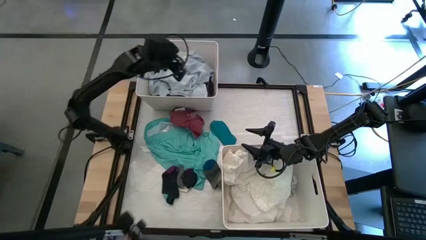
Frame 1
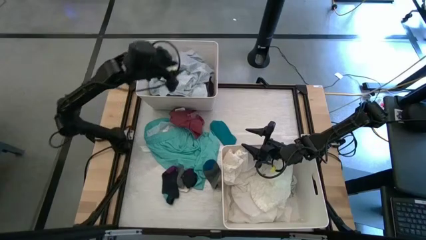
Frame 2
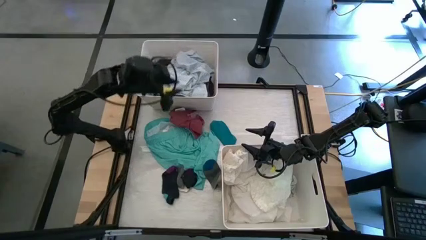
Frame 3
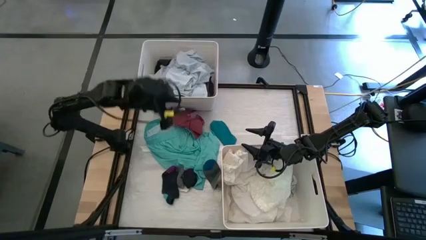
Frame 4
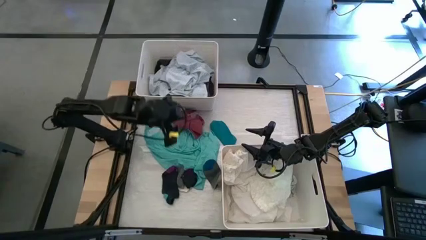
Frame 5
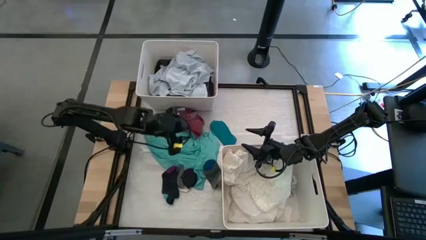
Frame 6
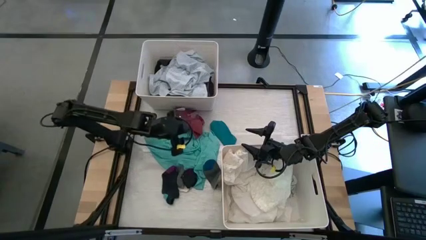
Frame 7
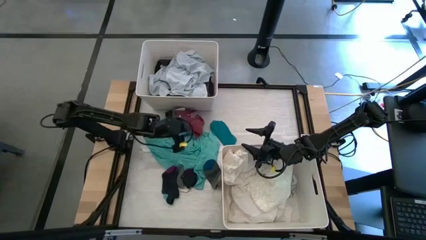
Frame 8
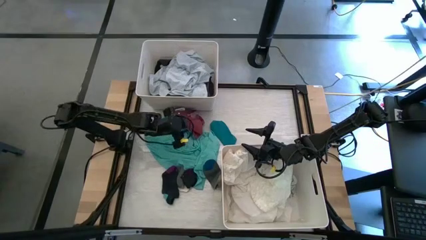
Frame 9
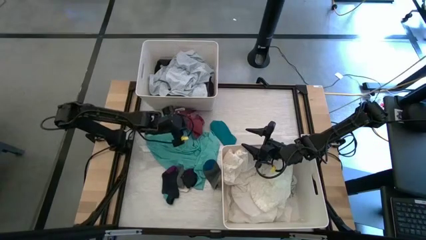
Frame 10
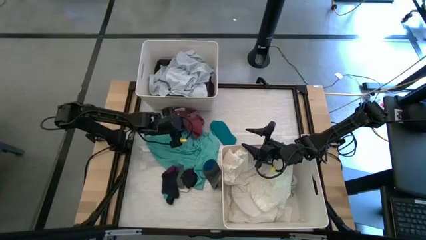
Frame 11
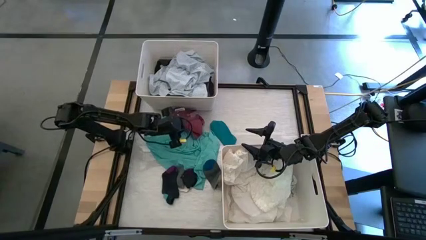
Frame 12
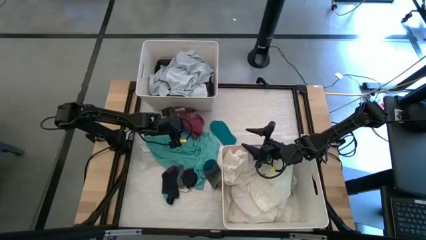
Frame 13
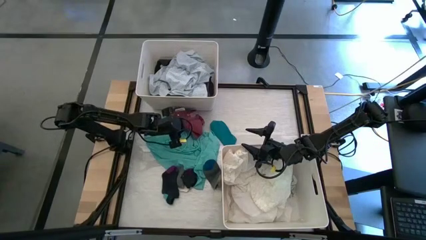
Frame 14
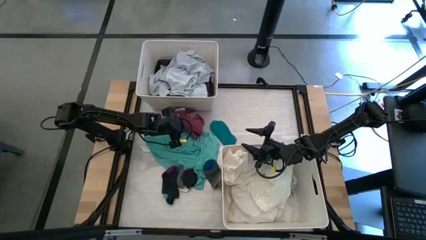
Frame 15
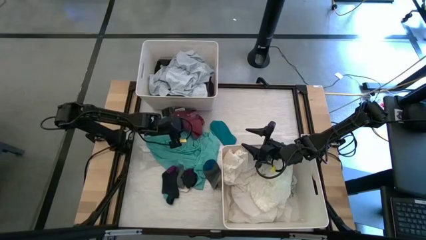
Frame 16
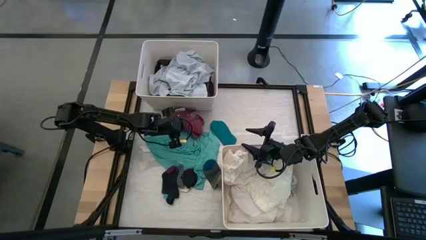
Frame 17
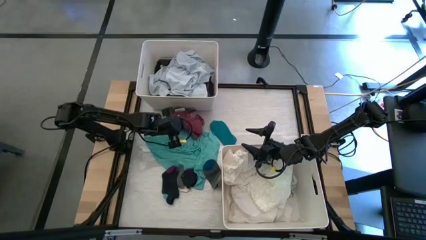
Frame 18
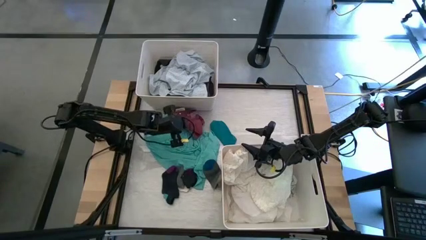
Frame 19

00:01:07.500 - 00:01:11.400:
Task: Sort clothes
Put the red underwear into the top laundry organizer

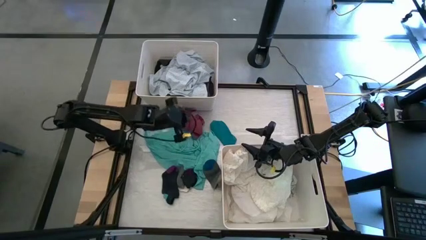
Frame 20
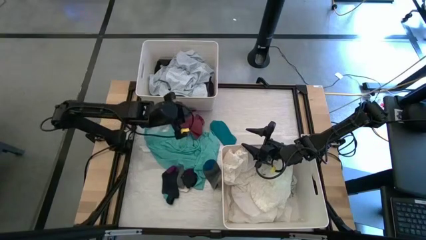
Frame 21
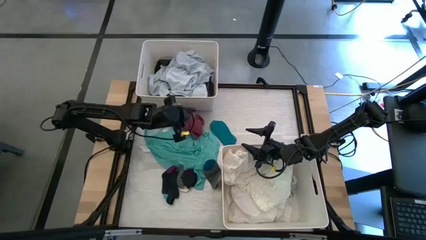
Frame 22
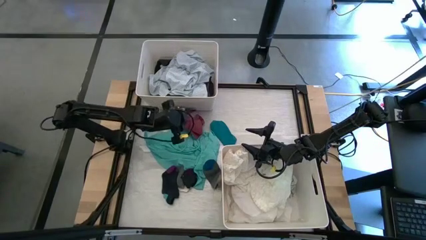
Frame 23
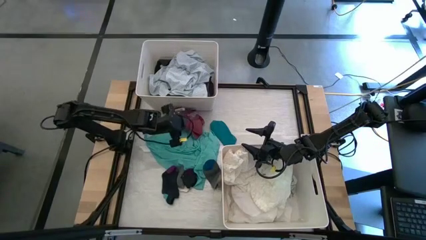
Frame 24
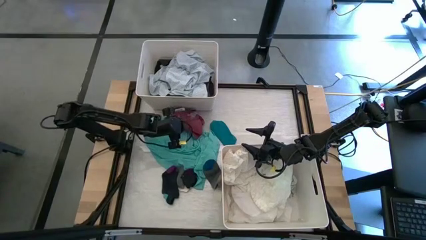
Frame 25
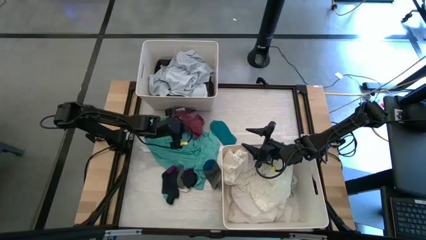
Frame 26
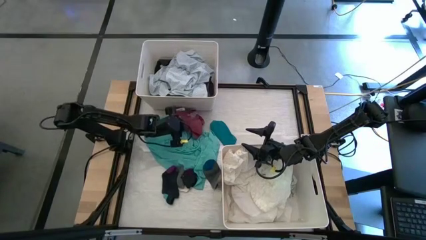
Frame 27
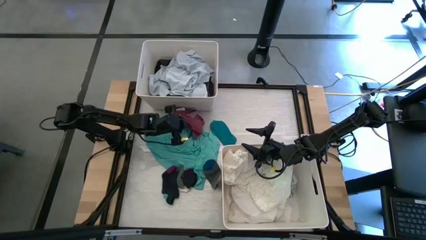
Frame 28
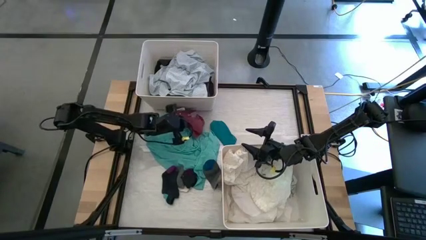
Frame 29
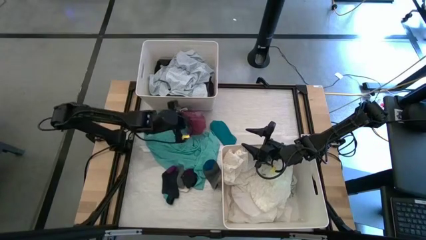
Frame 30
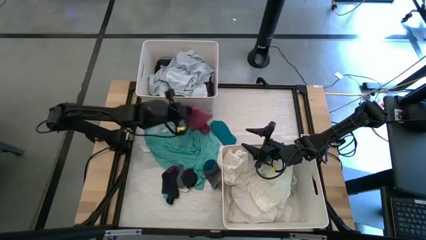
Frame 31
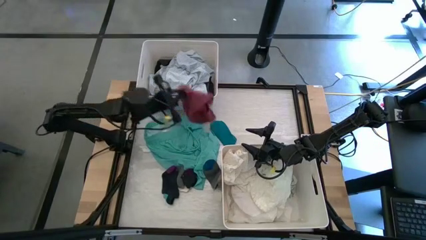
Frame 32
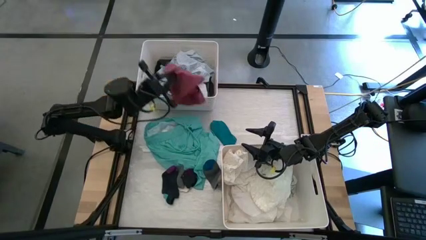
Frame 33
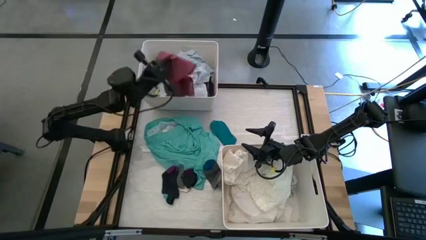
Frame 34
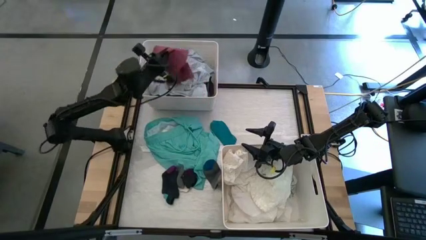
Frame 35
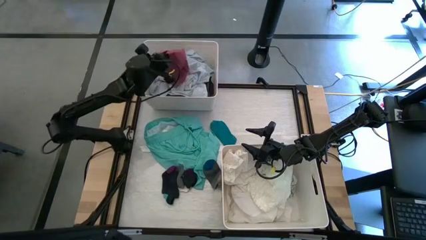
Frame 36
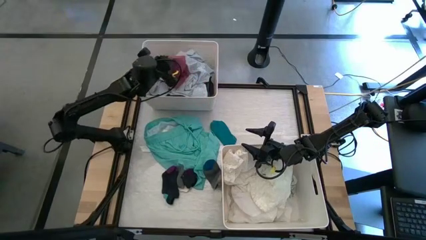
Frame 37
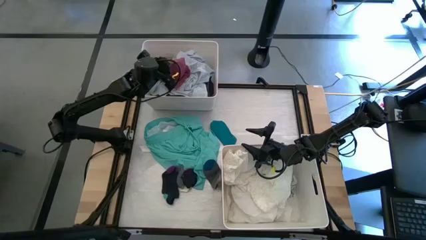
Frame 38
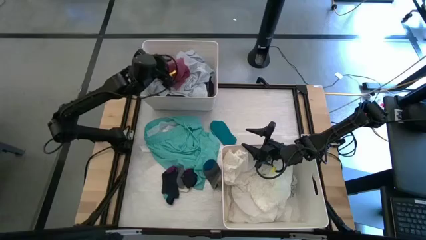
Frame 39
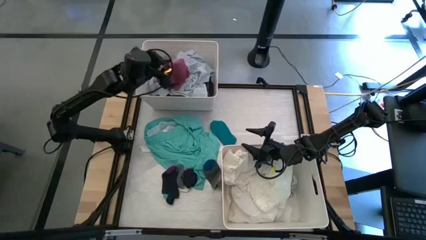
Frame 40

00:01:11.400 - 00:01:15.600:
Put the red underwear into the top laundry organizer

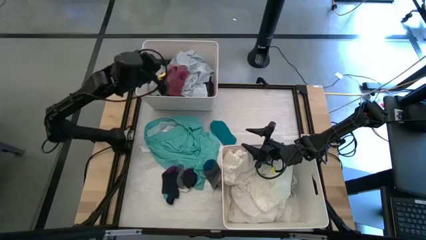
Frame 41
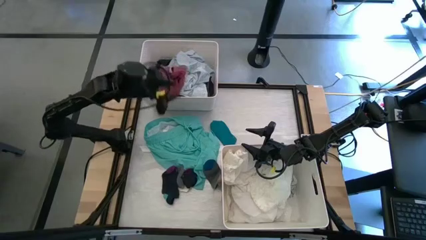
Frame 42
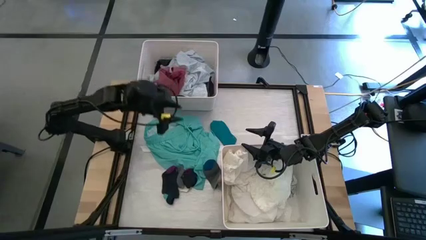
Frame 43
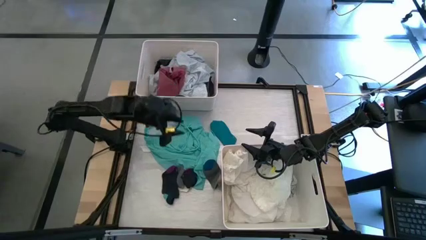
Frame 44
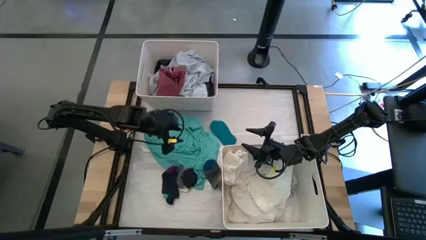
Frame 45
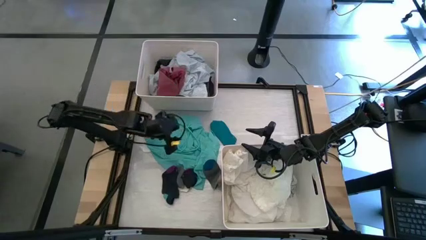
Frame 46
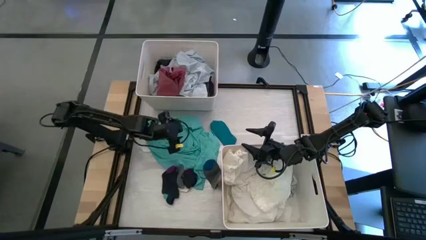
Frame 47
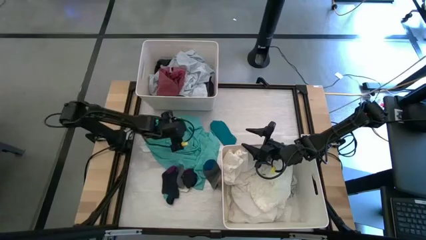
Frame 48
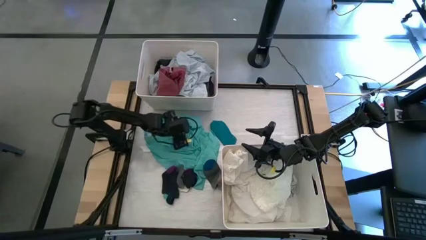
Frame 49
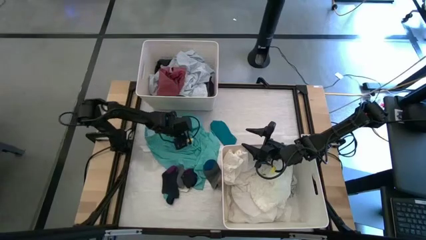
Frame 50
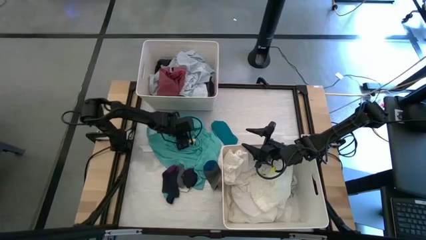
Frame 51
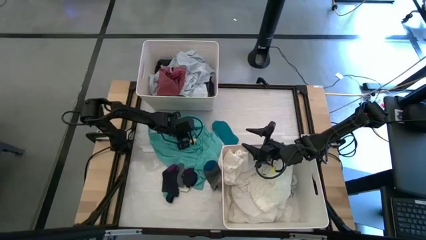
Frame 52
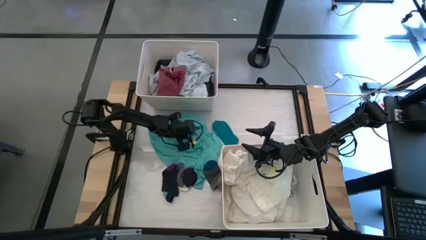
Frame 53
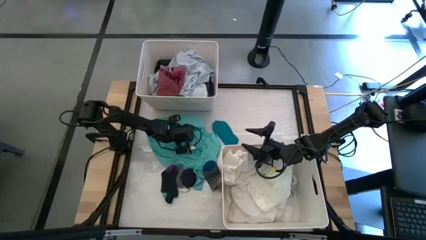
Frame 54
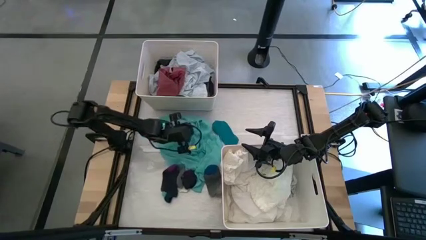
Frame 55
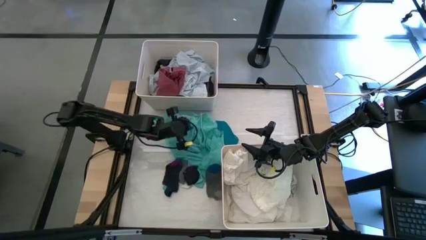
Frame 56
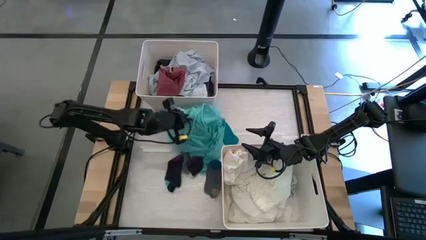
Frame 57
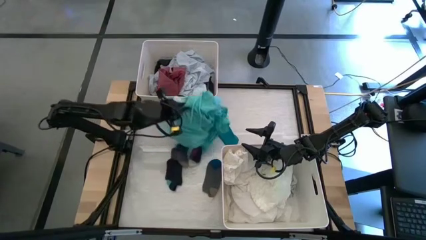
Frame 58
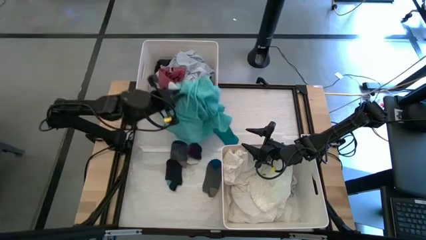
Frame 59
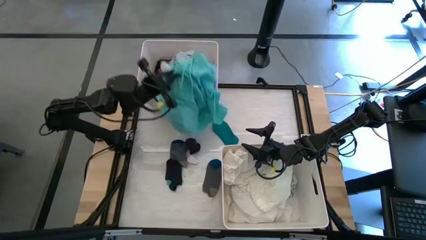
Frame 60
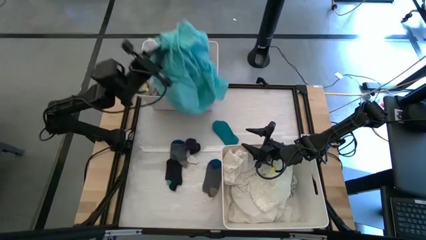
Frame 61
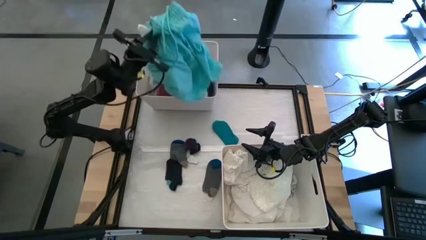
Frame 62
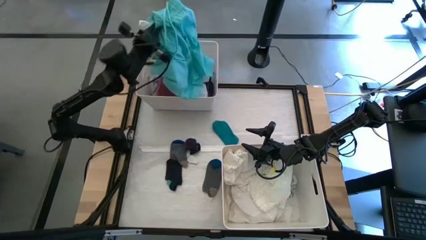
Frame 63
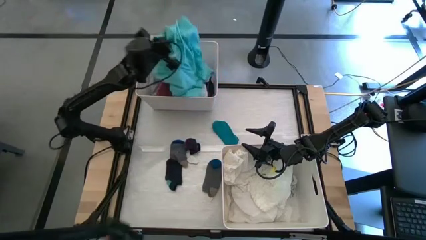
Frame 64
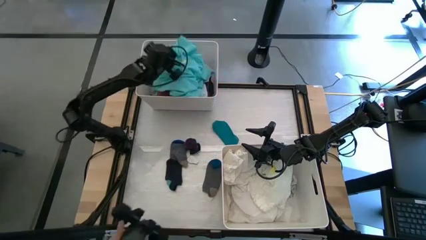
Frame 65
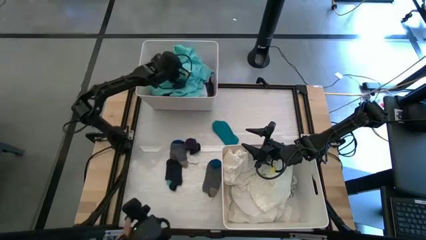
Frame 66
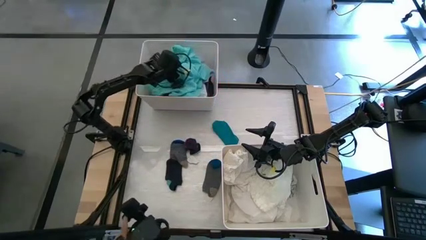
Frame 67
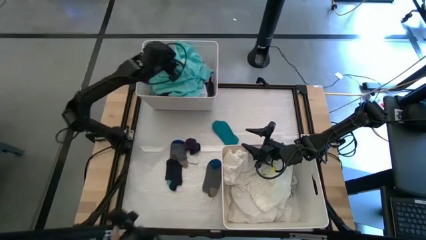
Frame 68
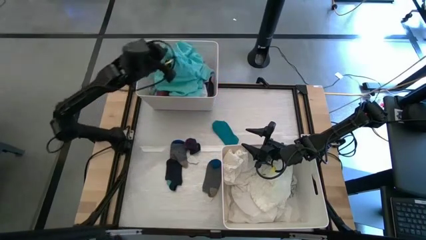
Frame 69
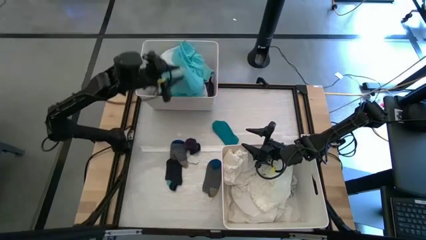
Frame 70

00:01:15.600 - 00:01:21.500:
Put the green shorts into the top white laundry organizer

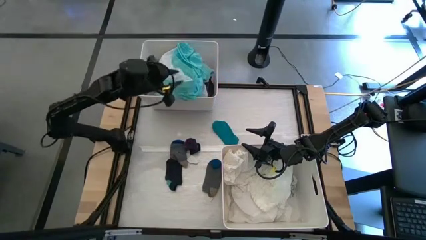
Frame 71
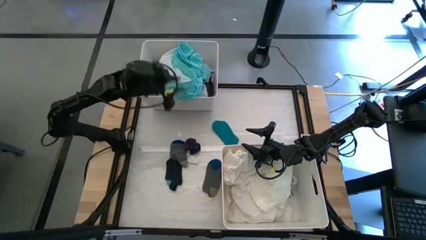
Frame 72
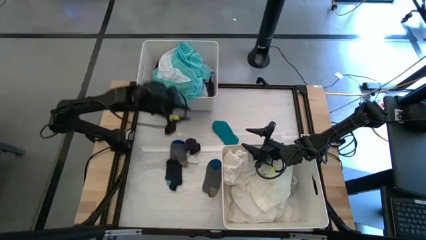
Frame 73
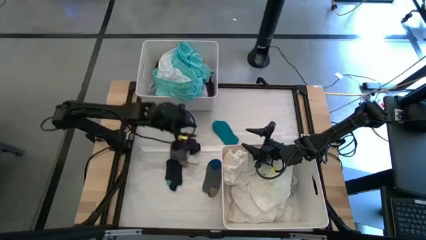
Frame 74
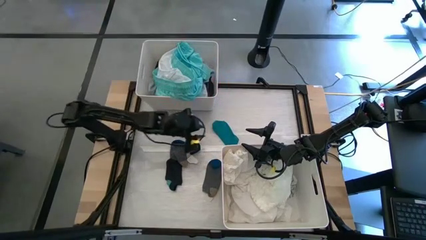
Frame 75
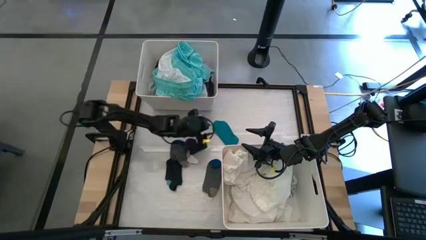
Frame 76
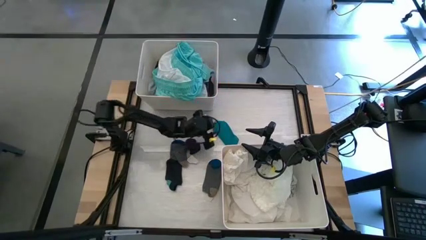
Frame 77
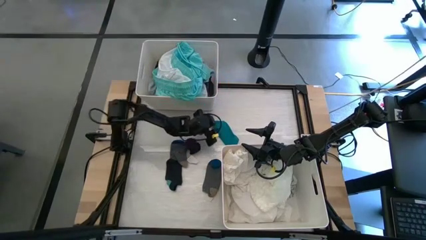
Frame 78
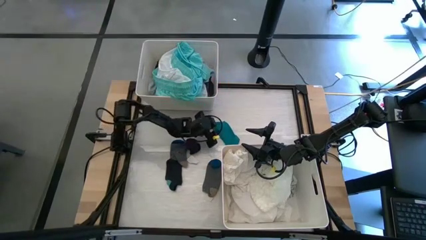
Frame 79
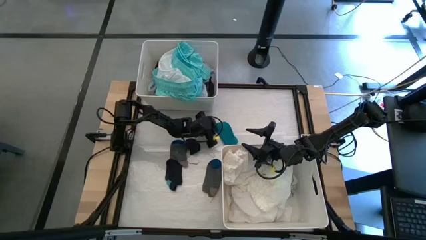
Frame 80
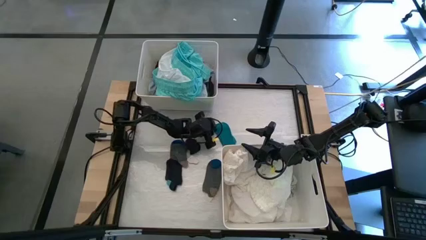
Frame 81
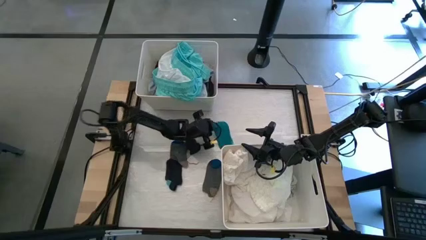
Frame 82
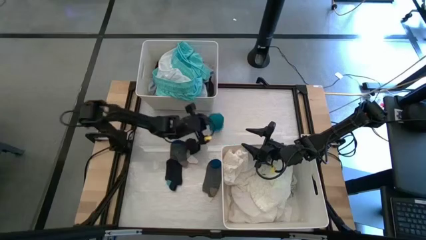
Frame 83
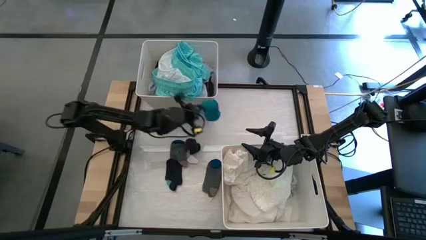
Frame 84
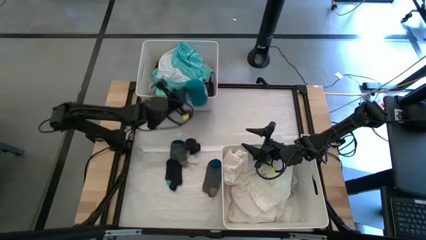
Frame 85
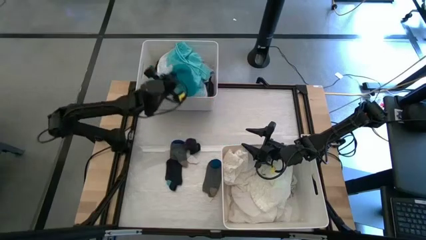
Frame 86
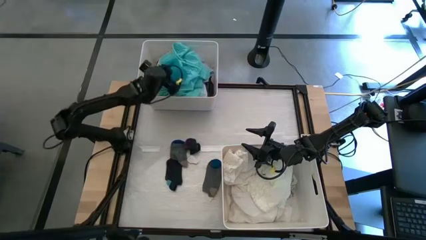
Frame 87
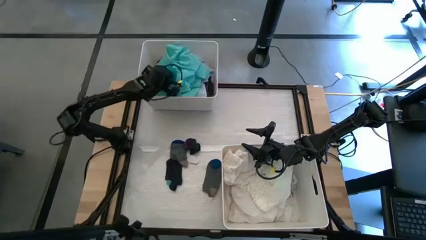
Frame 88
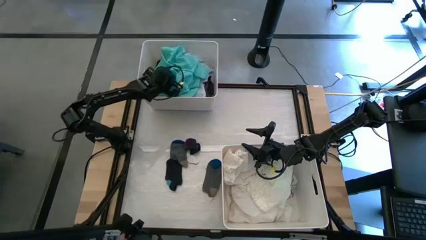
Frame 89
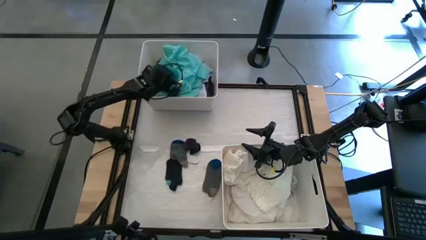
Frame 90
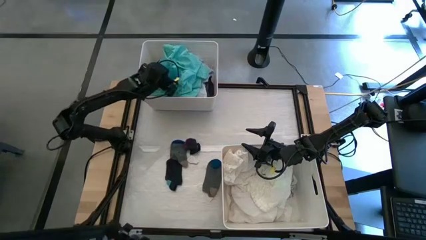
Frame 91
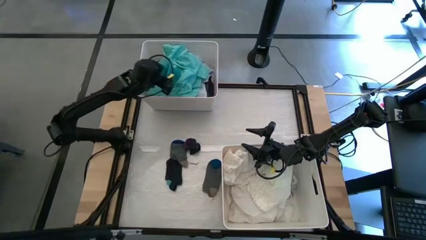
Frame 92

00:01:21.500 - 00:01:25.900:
Put the blue sock into the top white laundry organizer
